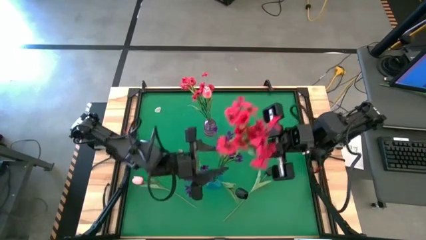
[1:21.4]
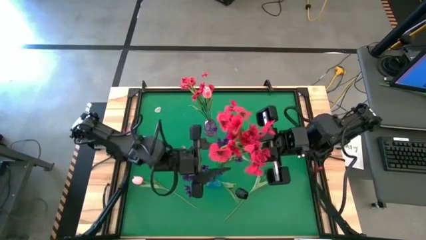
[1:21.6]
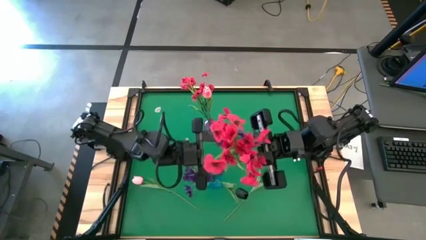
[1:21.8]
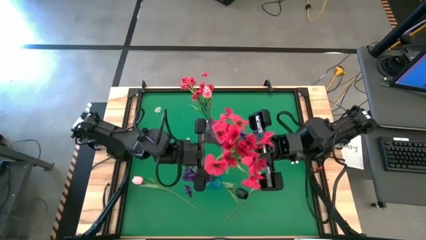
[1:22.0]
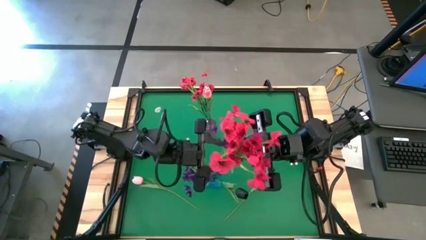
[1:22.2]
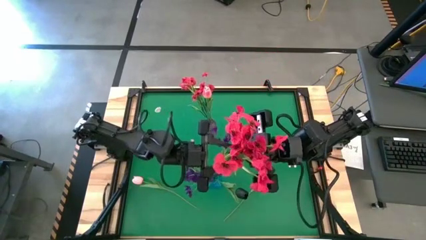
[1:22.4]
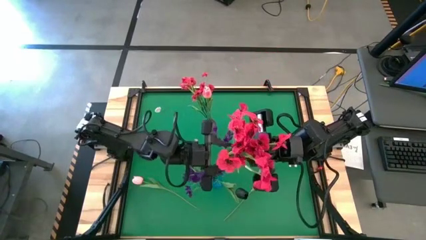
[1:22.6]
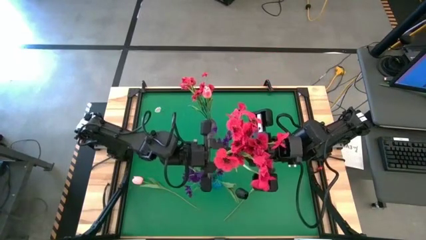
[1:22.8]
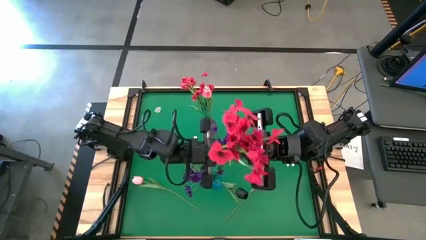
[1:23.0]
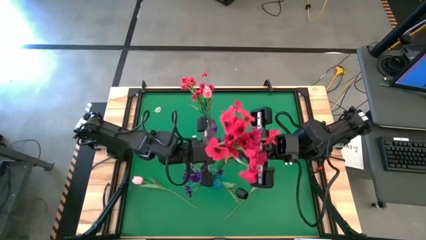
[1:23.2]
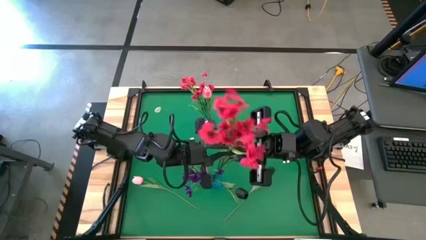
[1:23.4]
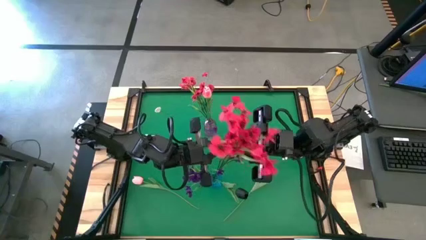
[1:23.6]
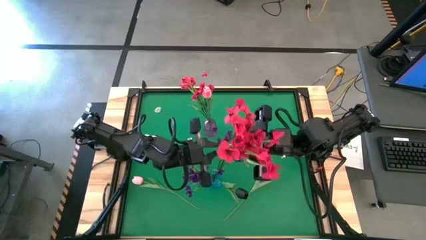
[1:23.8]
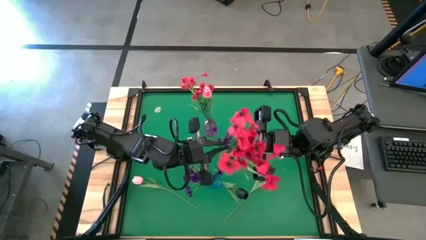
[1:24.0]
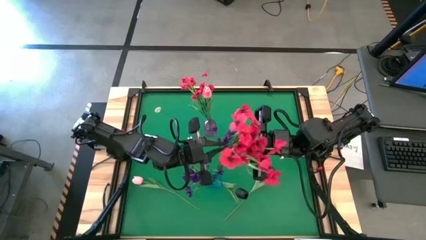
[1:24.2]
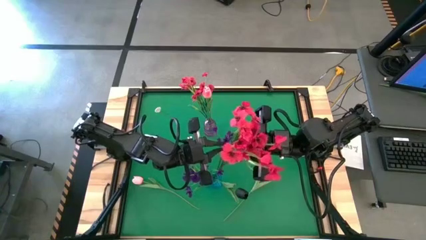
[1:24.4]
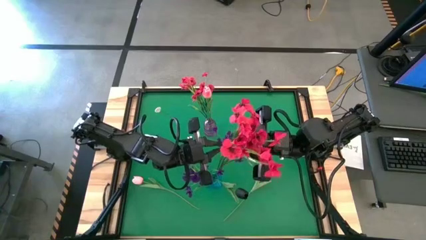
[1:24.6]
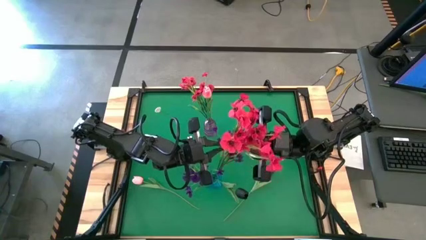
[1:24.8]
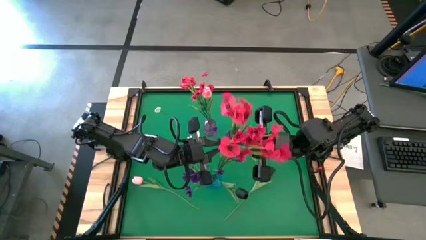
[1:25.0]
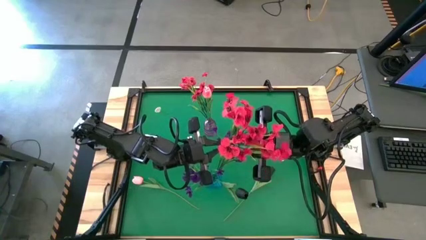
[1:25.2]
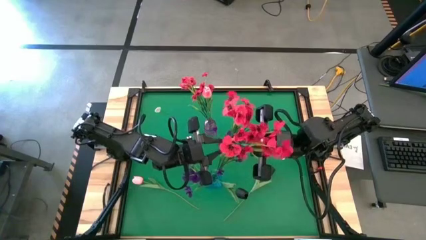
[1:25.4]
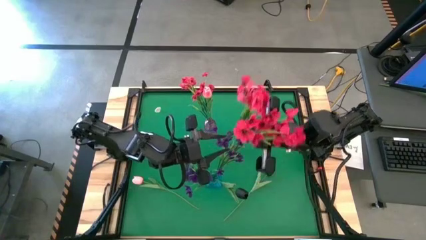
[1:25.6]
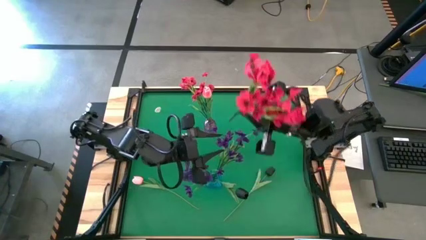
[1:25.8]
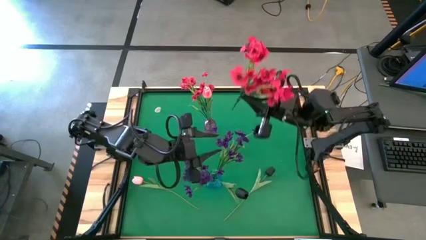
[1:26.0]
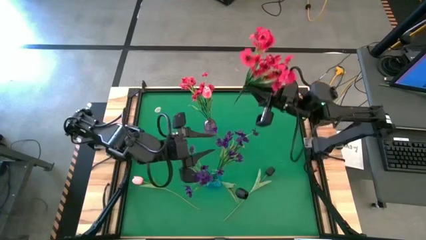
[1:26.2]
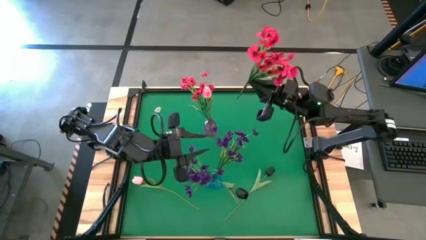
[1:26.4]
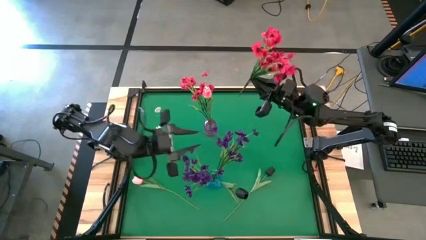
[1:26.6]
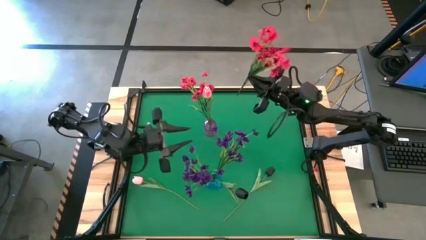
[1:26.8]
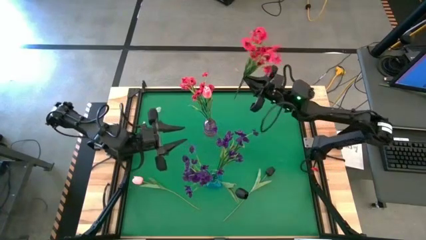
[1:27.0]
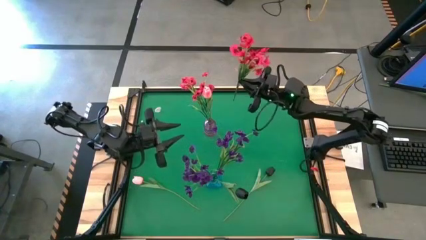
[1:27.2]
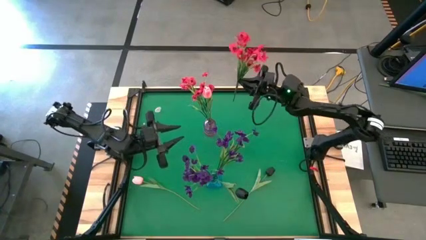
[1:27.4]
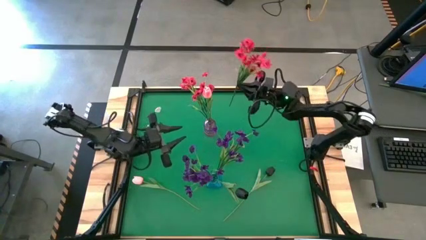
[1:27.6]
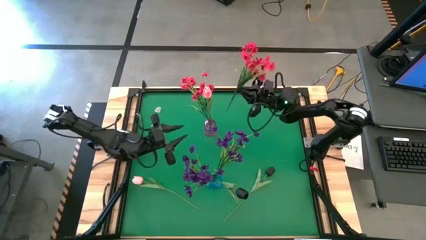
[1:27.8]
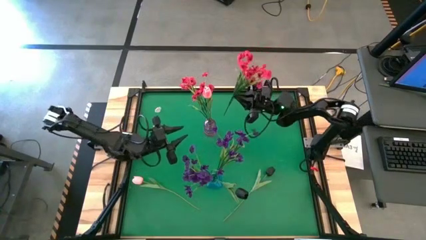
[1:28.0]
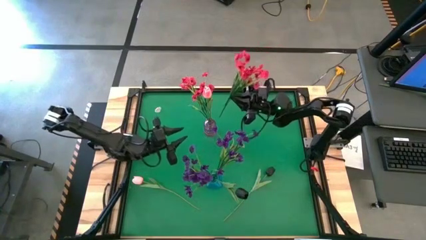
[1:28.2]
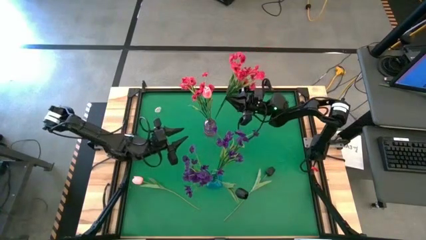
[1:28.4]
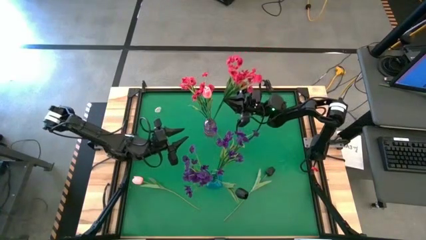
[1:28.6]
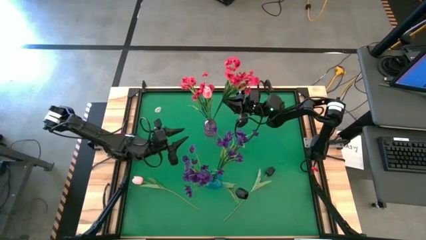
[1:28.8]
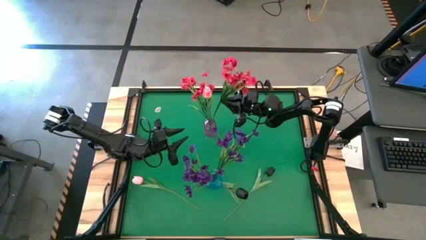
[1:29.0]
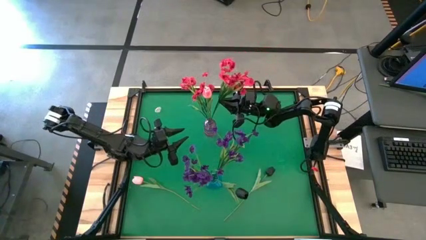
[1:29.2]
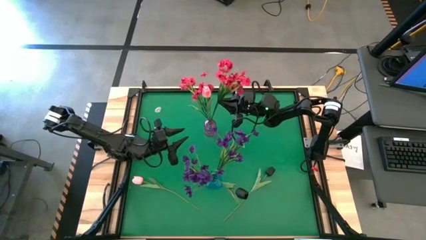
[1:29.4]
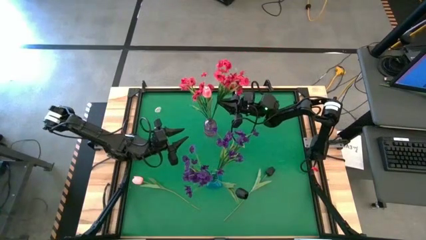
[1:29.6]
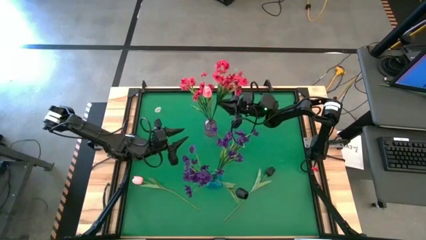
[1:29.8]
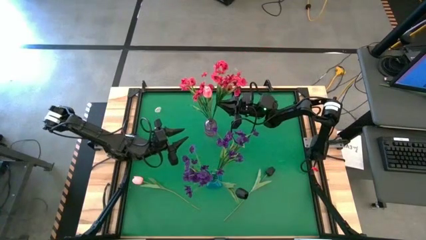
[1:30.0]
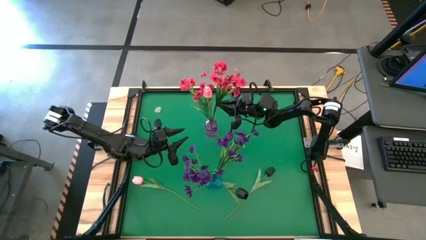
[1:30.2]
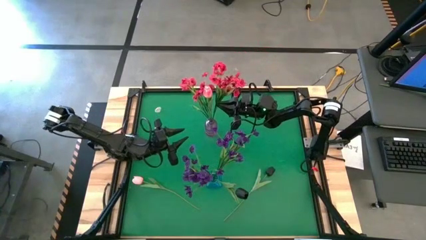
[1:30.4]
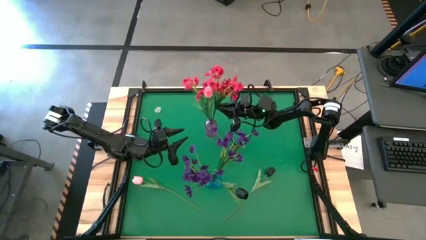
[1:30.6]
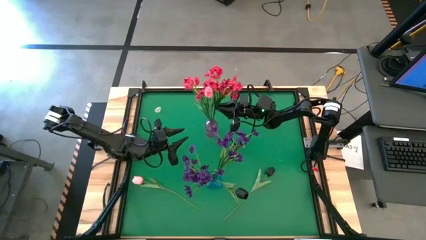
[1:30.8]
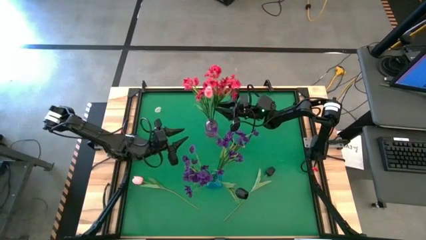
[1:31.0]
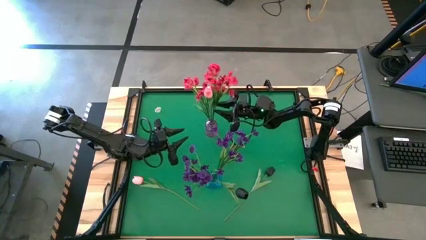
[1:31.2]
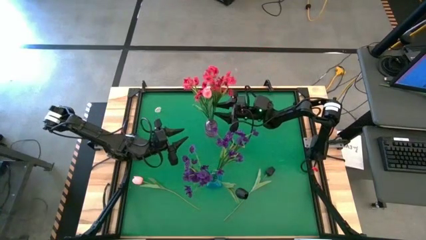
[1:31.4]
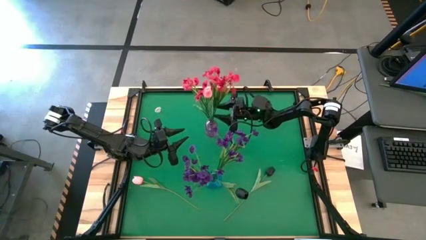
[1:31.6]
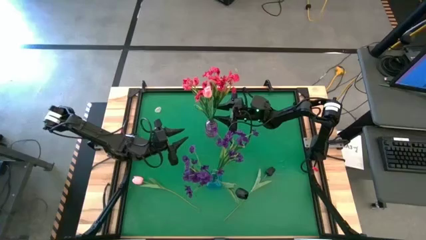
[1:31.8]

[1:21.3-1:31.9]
Task: Sort flowers into vase by color
Put the red flowers into the purple vase
